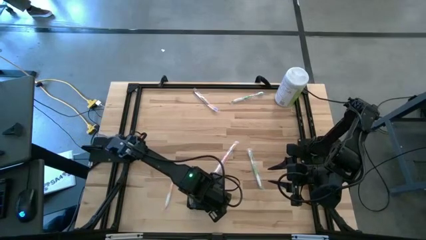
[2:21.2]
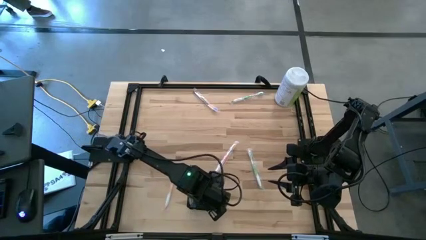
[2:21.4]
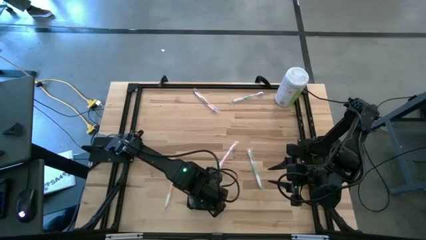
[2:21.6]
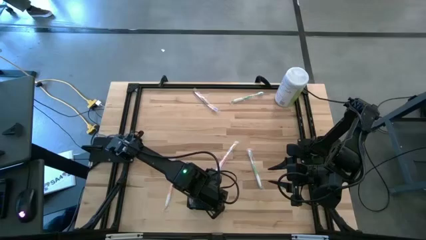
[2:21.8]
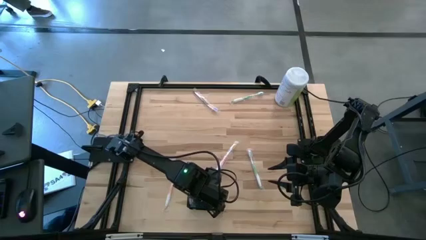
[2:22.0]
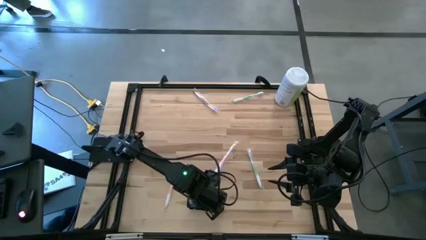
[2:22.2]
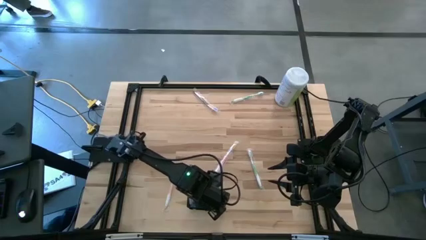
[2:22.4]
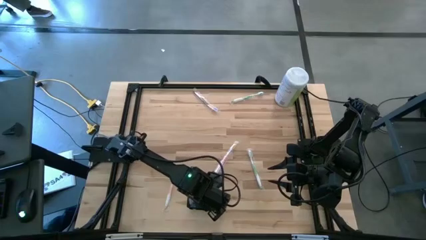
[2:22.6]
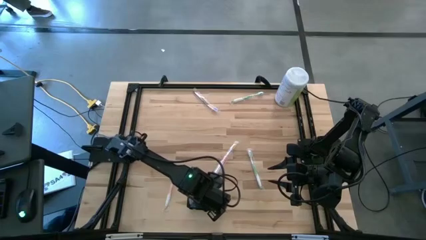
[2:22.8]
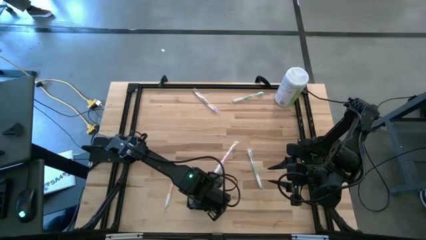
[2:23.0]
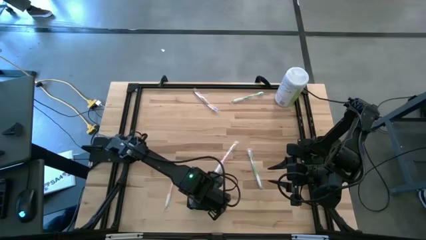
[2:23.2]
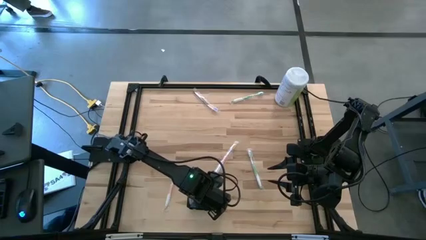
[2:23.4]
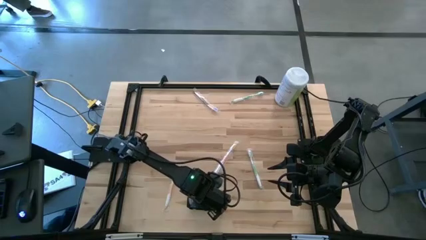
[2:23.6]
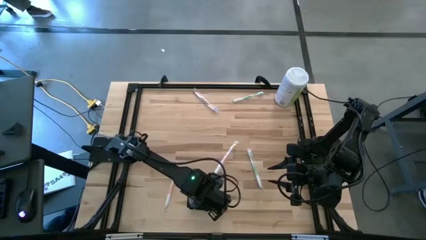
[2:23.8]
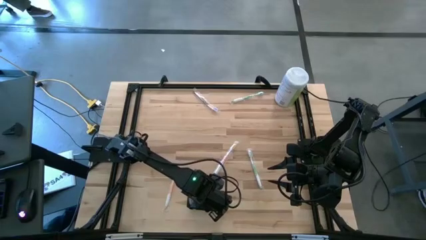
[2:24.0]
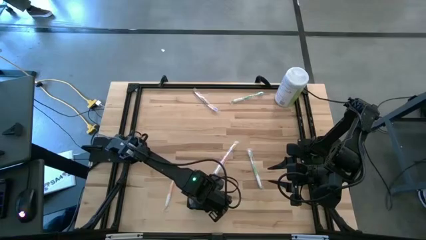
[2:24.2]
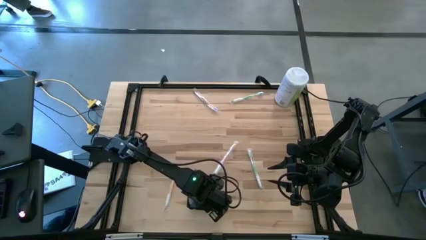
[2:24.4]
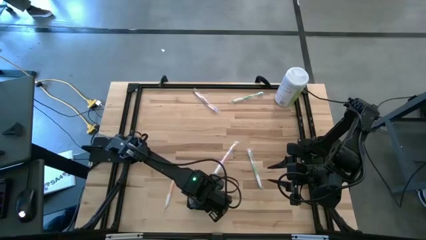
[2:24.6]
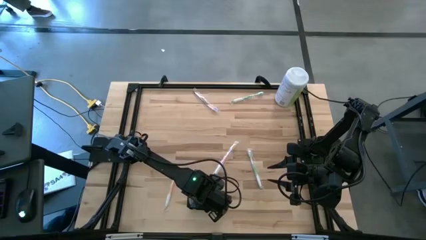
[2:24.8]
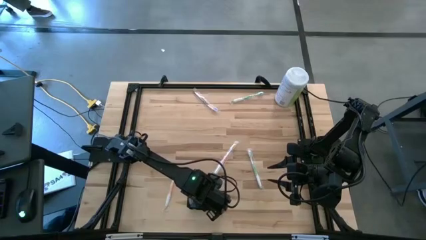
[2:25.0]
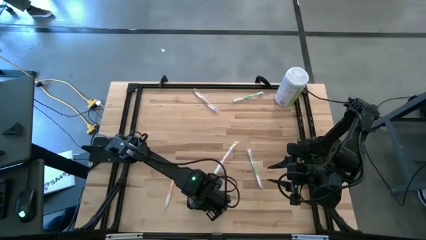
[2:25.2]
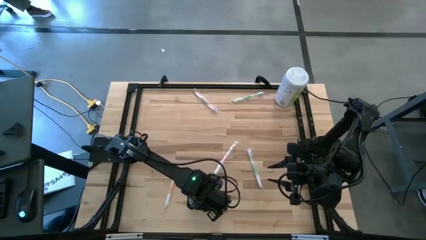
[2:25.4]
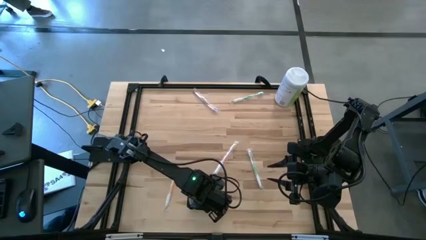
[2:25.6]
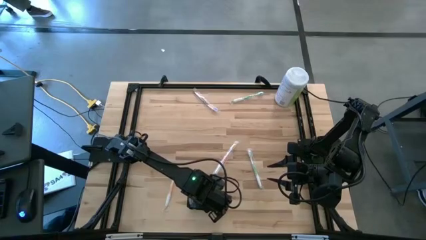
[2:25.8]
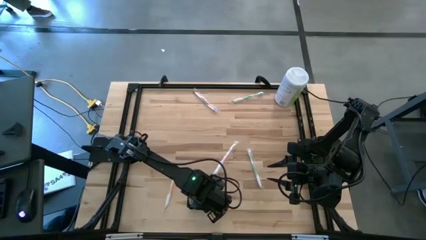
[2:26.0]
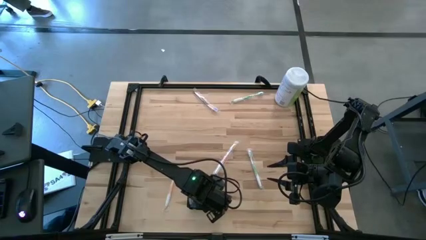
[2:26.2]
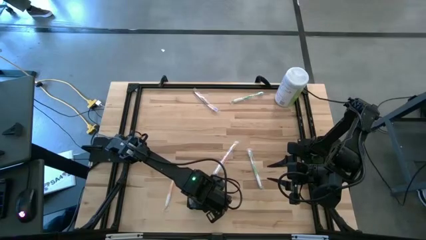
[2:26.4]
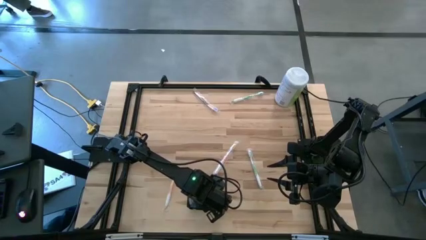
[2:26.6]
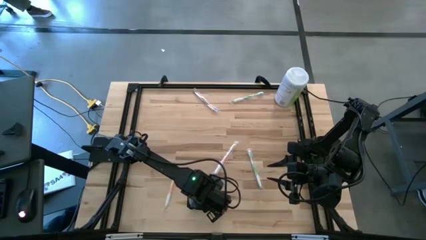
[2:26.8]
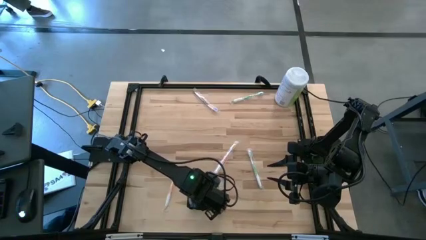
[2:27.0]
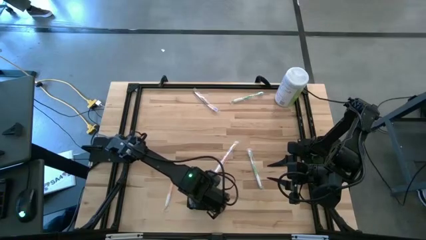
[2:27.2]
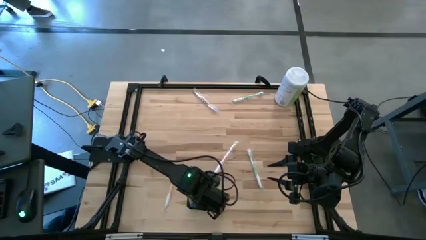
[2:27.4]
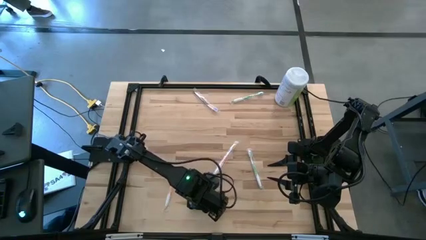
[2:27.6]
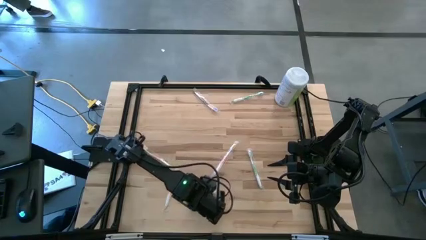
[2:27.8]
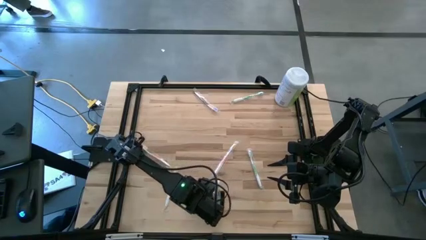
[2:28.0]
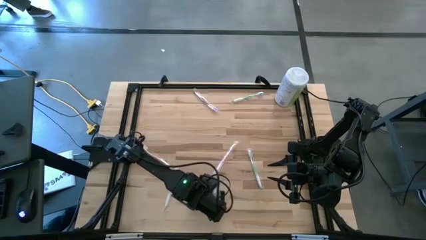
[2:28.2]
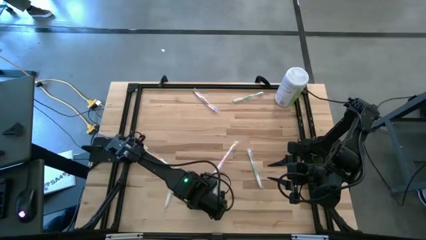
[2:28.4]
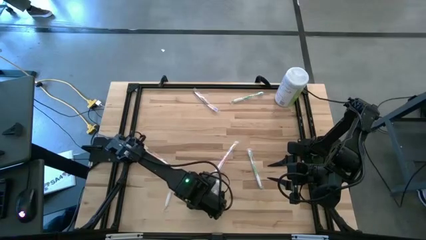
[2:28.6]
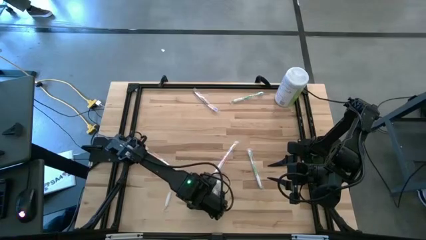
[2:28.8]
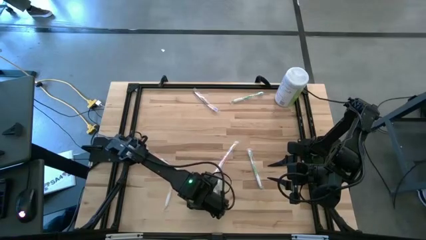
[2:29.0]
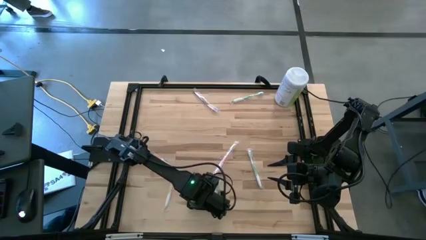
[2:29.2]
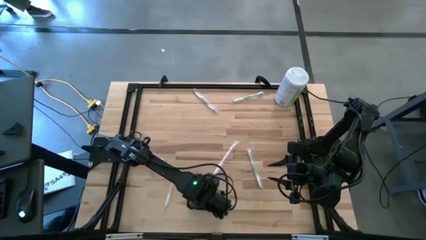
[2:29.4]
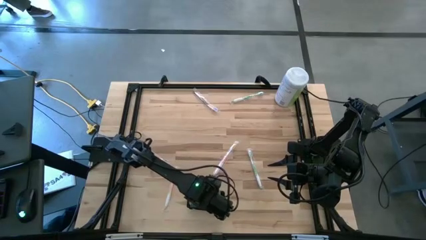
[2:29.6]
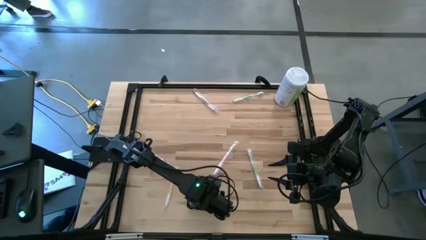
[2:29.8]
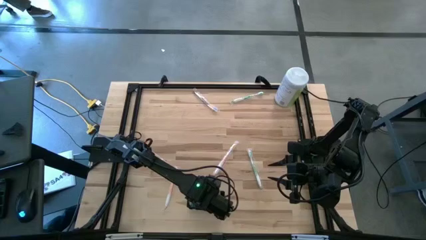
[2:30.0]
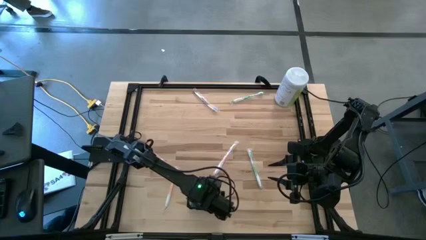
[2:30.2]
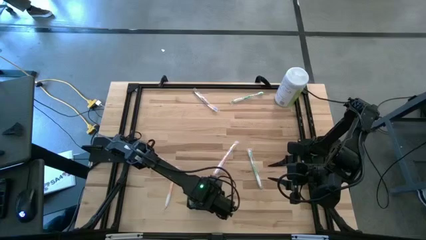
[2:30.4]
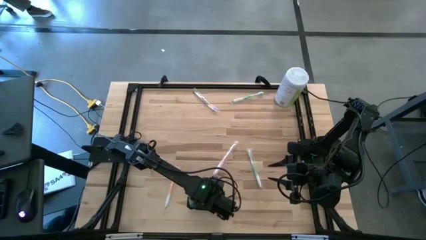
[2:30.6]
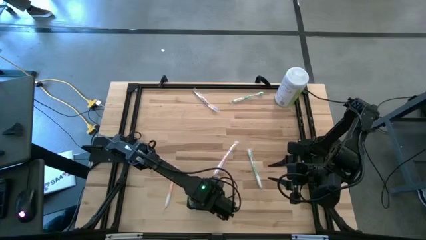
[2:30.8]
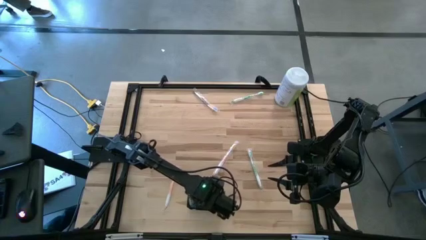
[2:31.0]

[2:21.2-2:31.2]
Task: Pick & Place toothbrushing station
Put the blue mouthwash into the black wire organizer

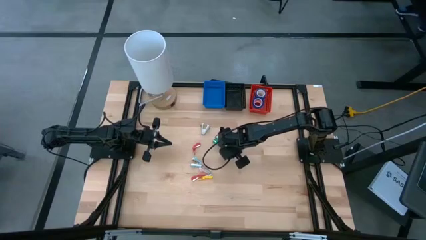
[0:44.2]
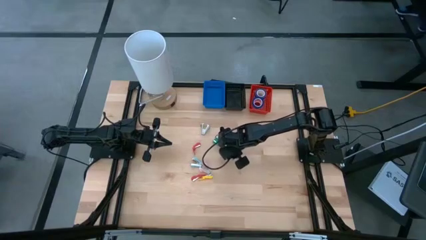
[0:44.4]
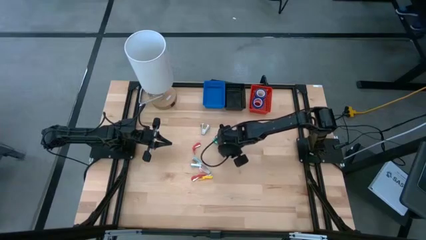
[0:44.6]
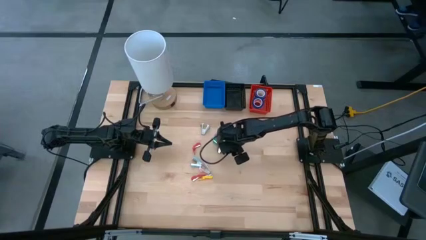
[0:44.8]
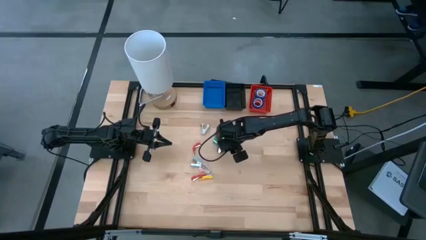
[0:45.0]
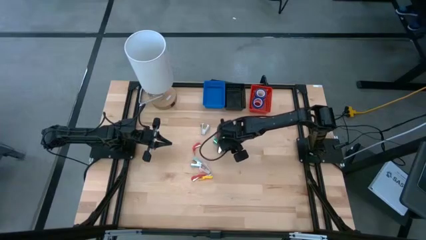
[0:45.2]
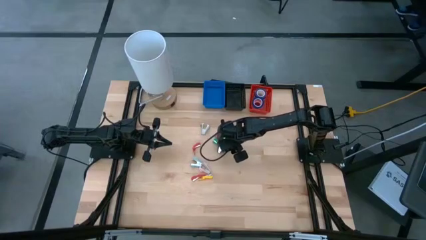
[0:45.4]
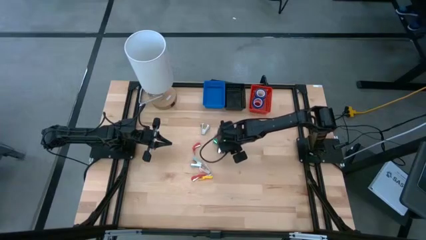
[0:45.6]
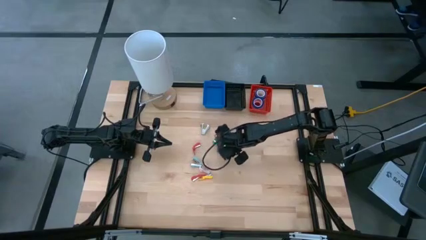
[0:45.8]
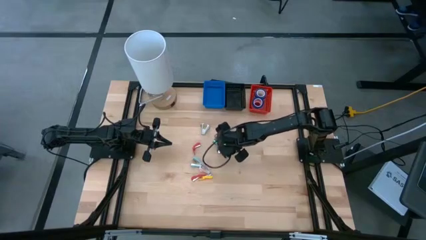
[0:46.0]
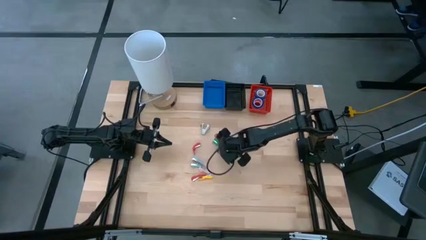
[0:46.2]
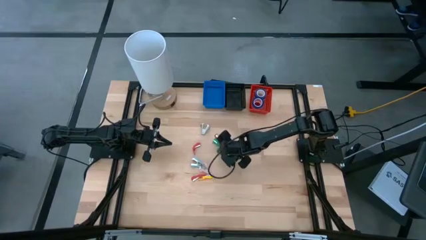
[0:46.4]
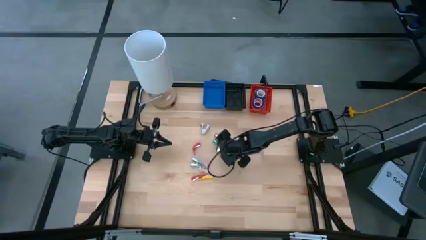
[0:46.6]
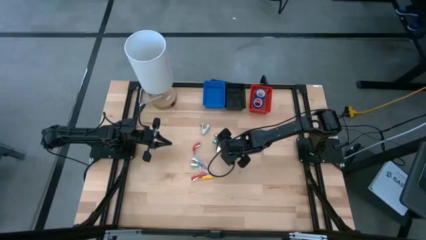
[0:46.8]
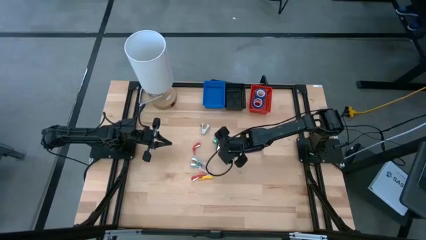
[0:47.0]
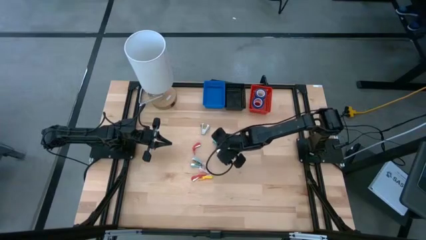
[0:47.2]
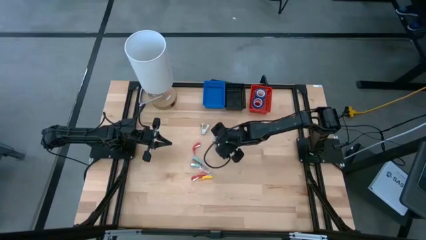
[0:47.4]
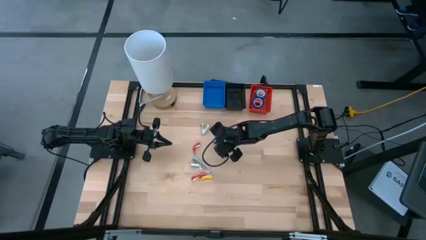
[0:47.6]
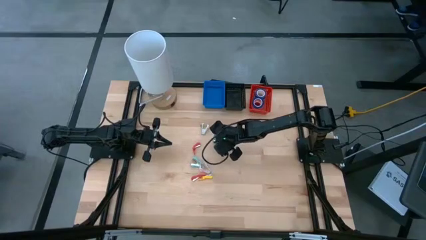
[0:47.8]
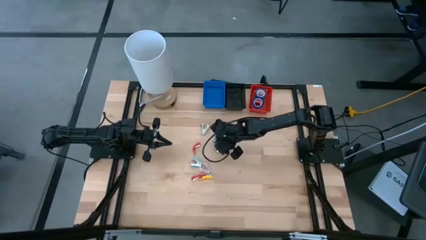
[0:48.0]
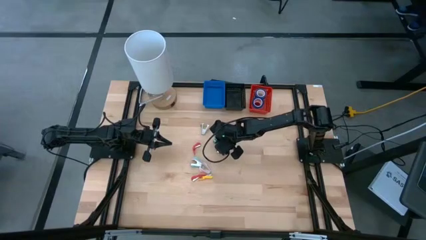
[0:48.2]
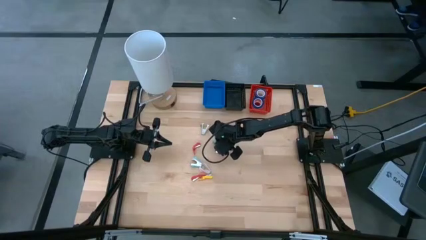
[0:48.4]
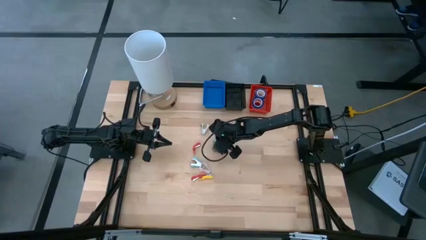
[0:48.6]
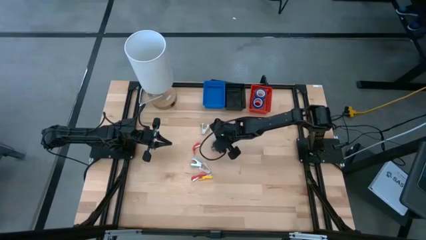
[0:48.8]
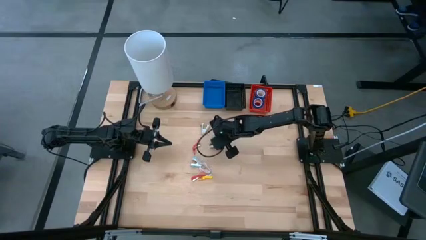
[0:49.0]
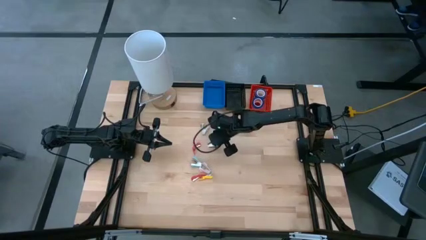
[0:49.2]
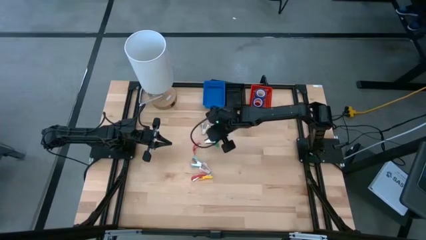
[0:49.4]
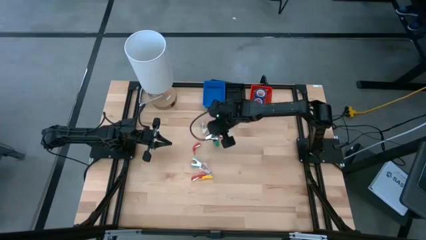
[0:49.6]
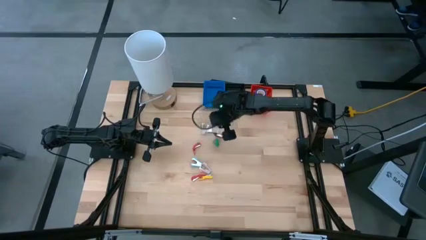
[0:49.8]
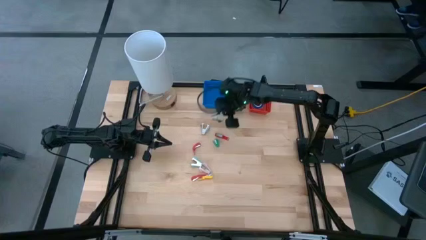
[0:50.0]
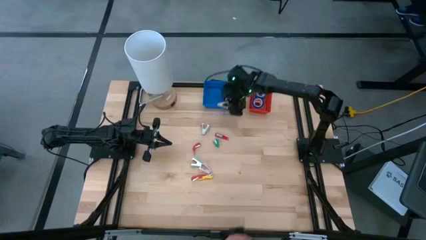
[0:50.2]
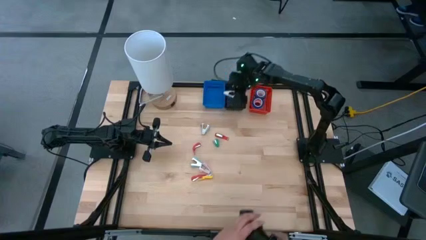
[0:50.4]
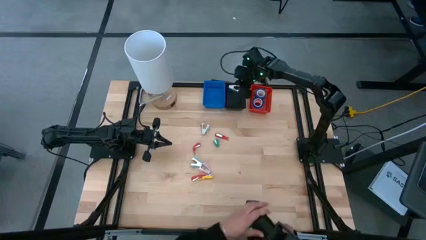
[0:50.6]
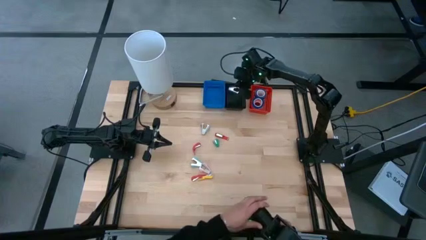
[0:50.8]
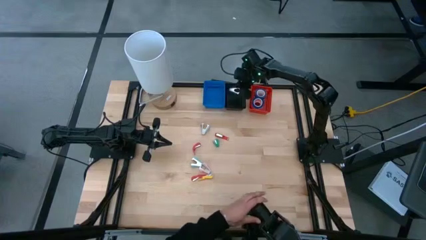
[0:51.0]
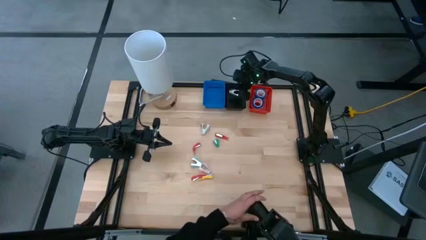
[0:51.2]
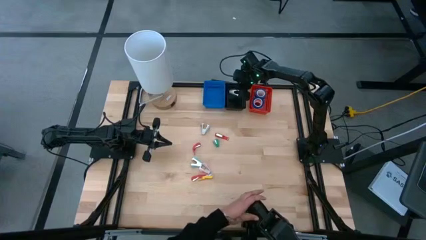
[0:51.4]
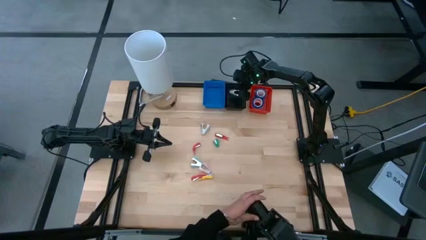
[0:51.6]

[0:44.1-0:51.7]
Task: Pick and place Stapler, Stapler remover, tape
Put the black staple remover into the black bin
